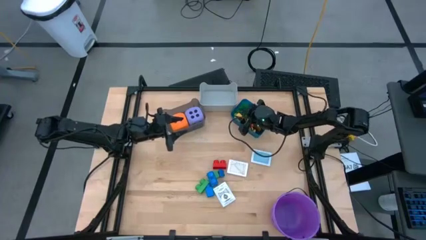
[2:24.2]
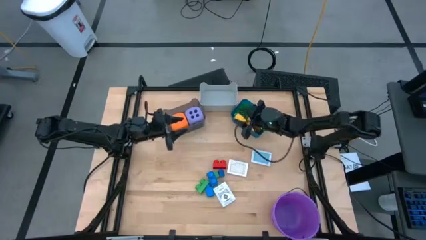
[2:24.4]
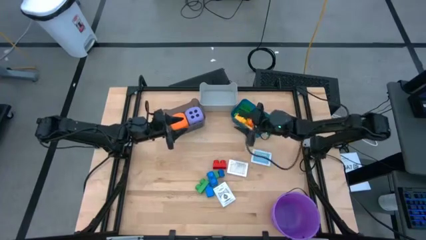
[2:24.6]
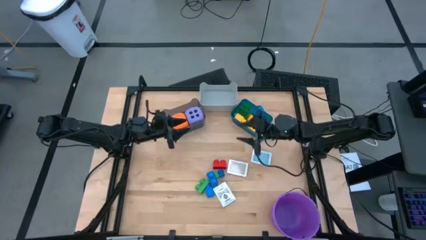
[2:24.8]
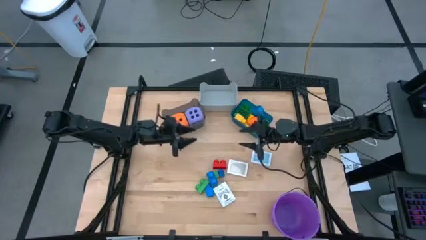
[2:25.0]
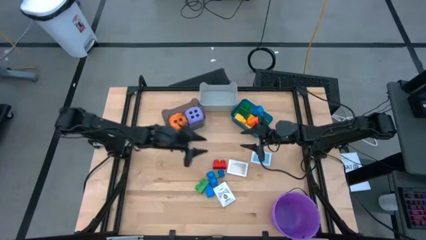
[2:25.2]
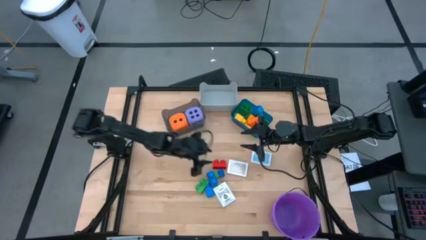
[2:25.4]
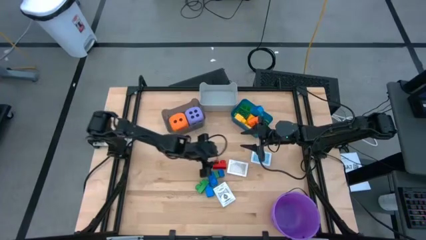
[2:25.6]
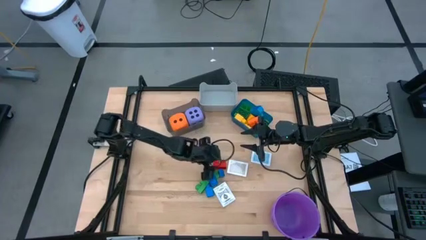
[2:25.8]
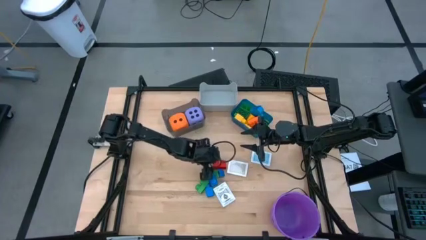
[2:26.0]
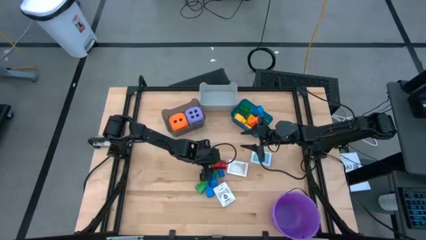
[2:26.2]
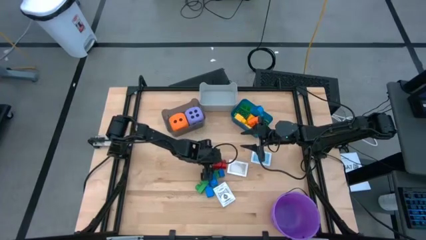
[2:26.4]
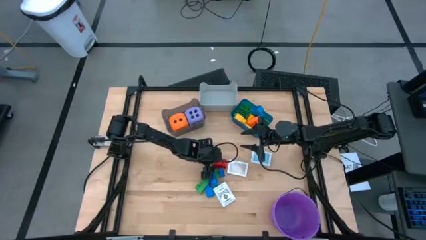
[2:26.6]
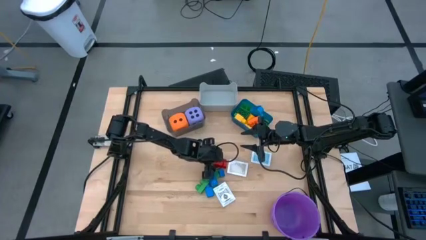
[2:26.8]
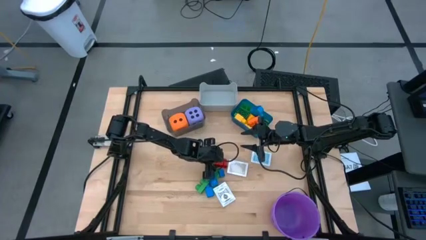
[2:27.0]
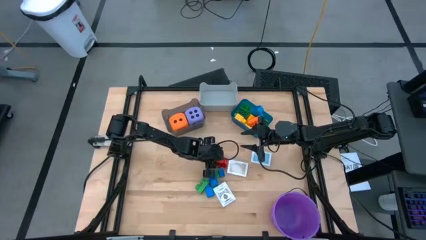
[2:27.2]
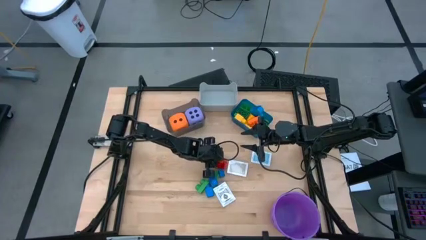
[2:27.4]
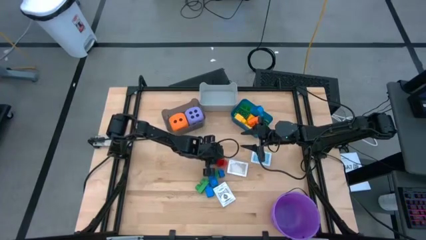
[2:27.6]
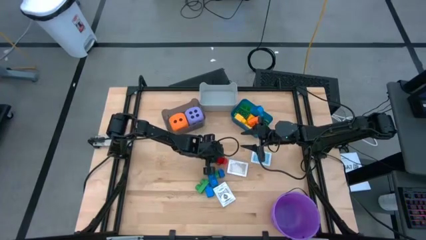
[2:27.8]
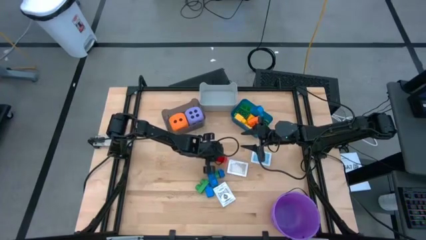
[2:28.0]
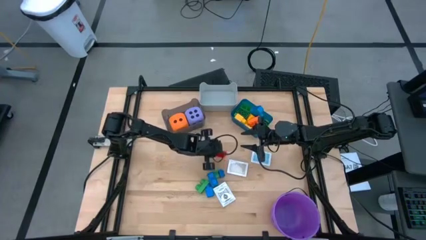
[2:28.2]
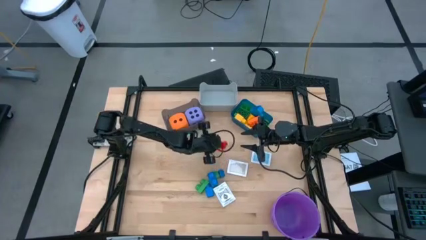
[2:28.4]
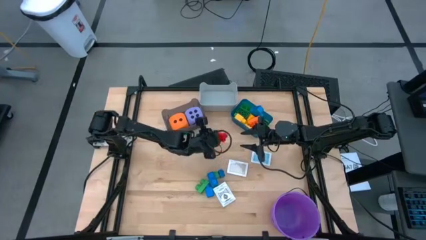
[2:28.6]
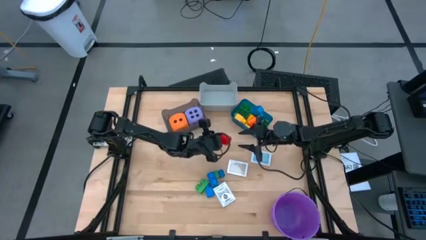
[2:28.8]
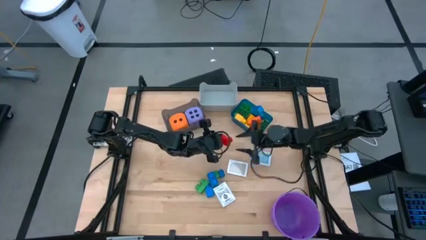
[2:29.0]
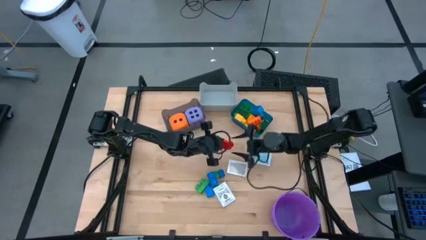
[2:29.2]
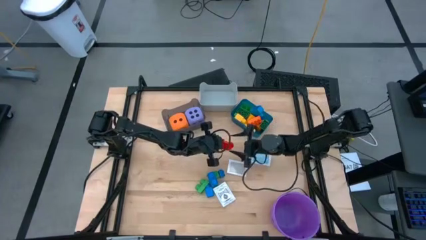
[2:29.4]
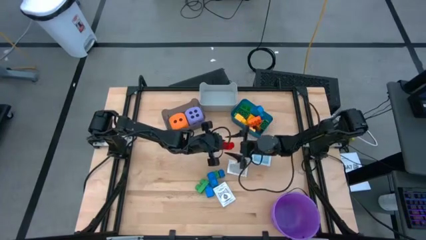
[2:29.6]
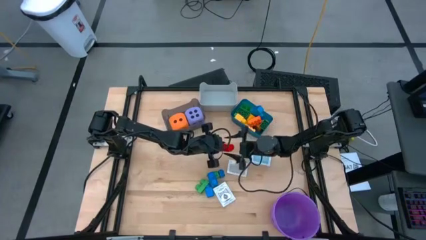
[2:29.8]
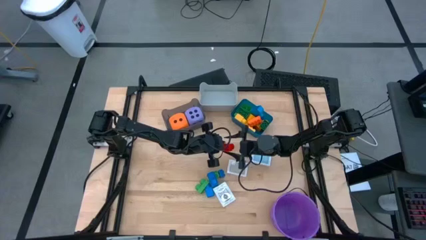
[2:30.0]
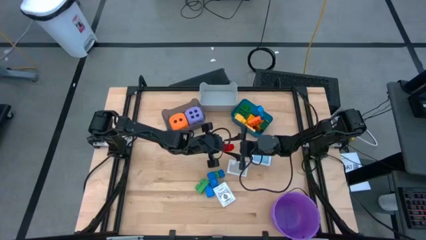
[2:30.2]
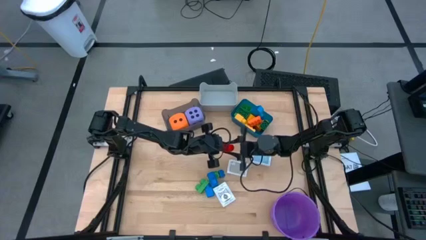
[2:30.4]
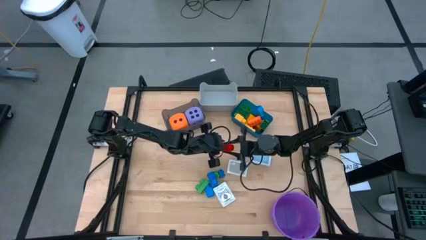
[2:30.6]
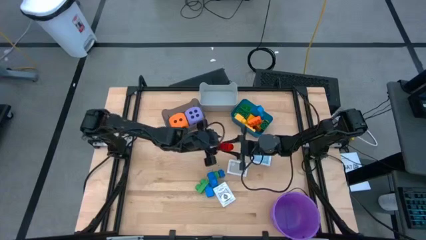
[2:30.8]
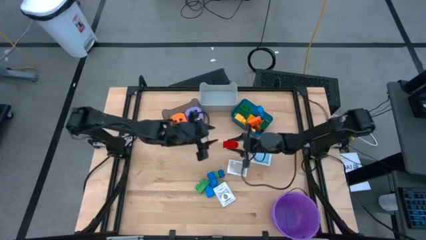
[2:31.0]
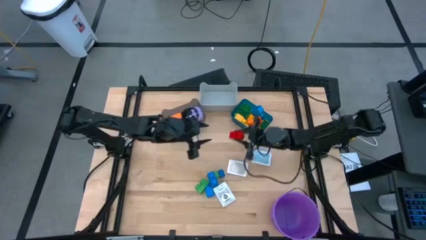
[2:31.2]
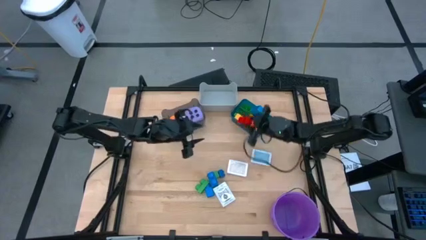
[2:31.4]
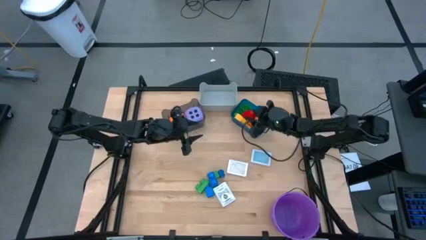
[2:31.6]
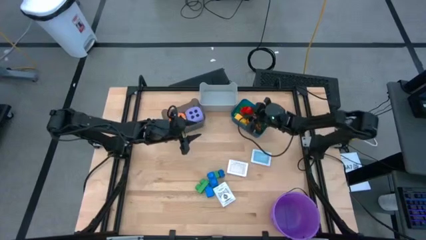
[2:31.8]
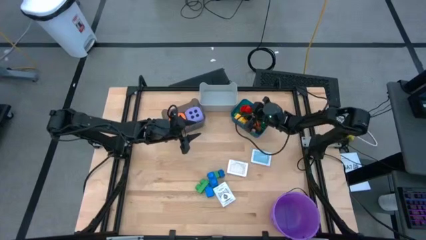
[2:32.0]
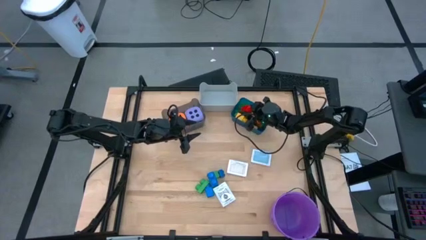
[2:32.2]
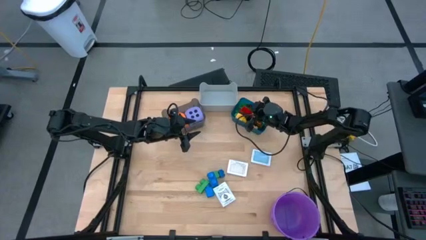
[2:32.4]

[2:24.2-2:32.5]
Task: Pick & Place Toys
Put the red 2 studs game piece into the blue bin

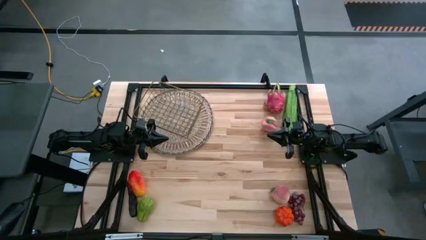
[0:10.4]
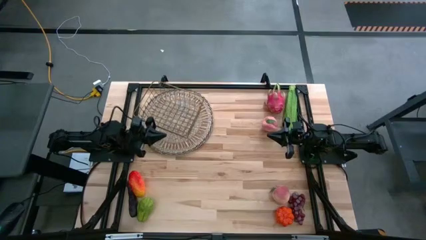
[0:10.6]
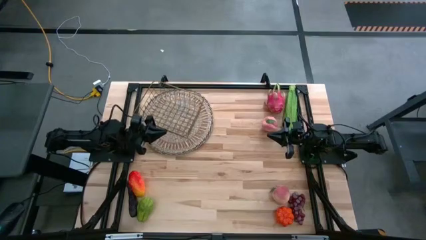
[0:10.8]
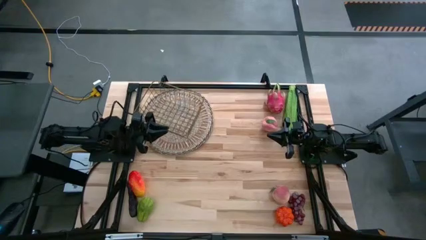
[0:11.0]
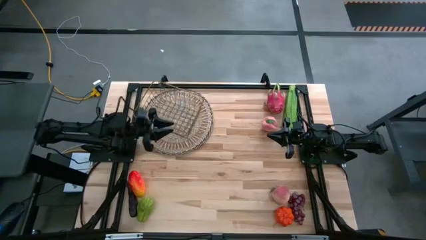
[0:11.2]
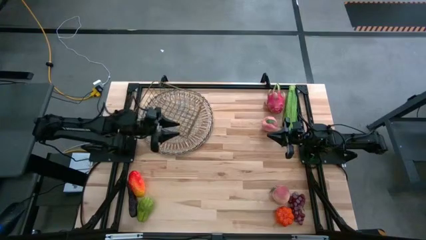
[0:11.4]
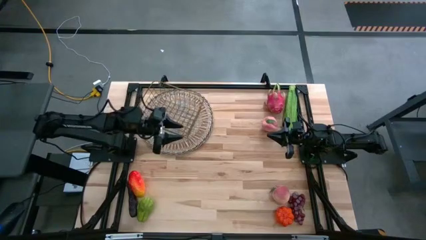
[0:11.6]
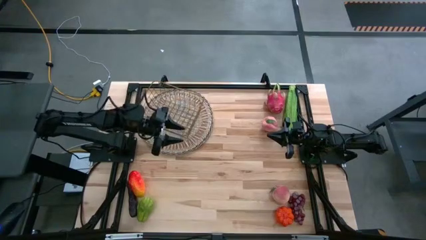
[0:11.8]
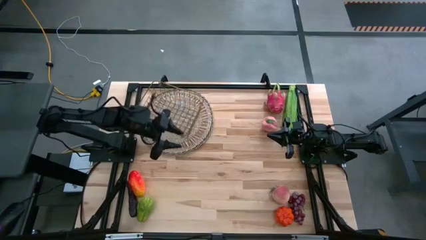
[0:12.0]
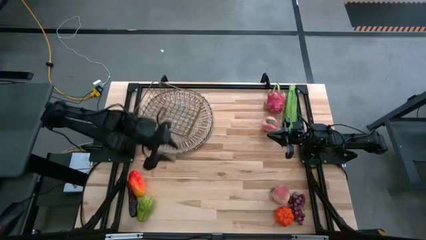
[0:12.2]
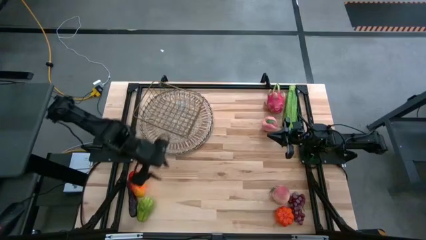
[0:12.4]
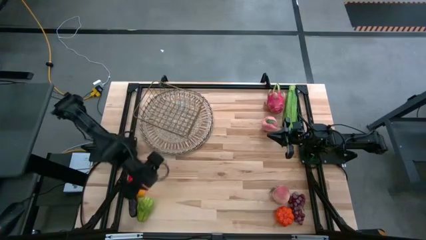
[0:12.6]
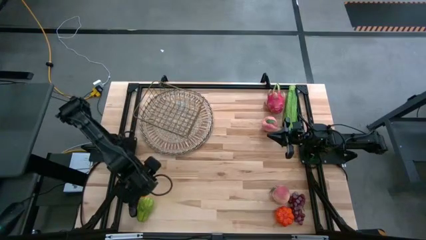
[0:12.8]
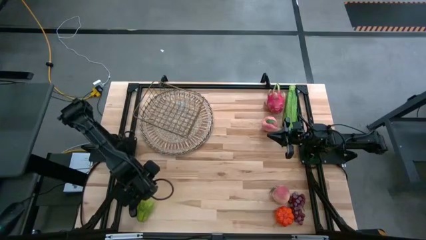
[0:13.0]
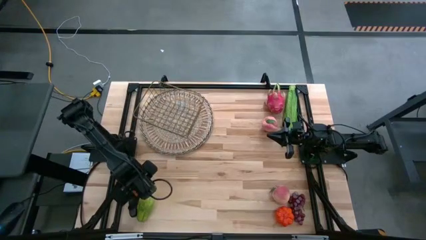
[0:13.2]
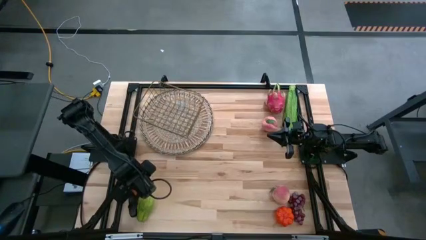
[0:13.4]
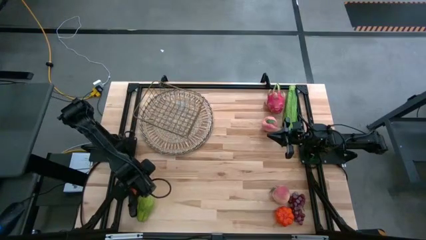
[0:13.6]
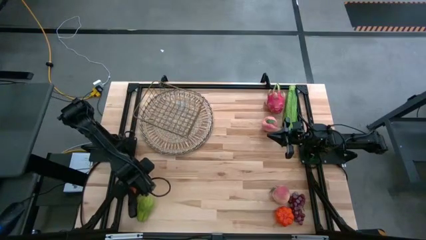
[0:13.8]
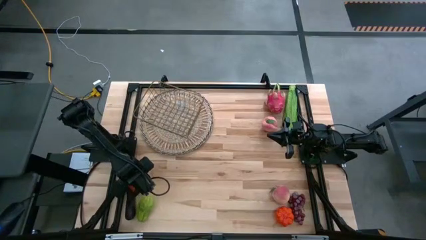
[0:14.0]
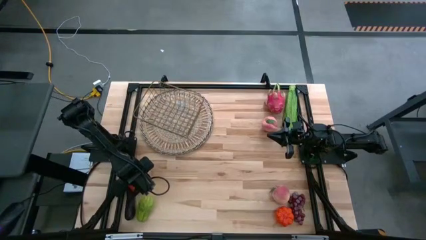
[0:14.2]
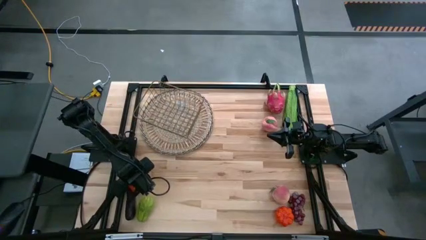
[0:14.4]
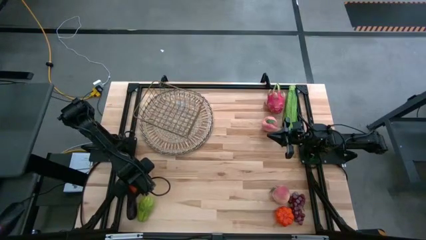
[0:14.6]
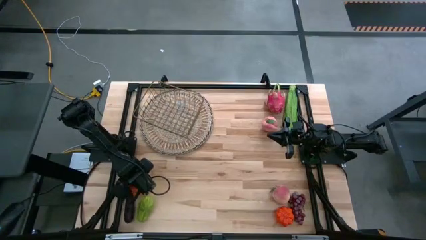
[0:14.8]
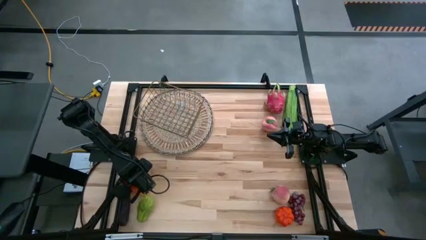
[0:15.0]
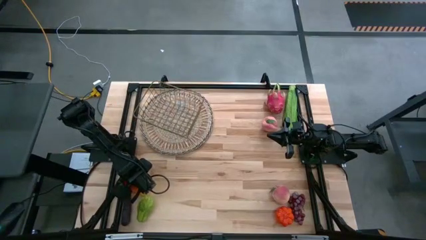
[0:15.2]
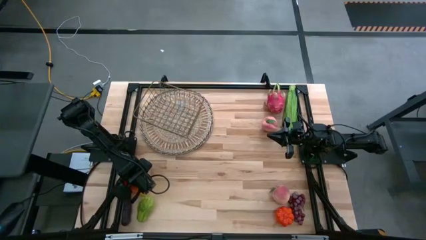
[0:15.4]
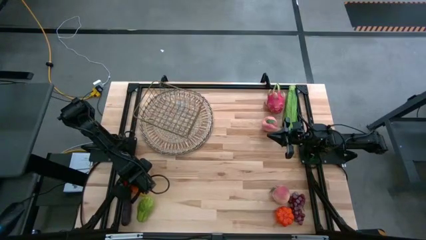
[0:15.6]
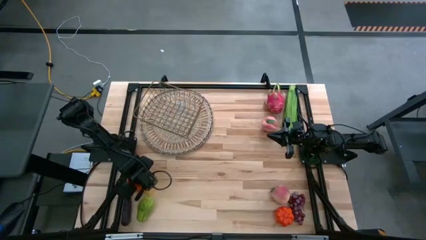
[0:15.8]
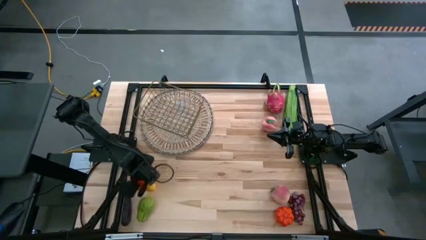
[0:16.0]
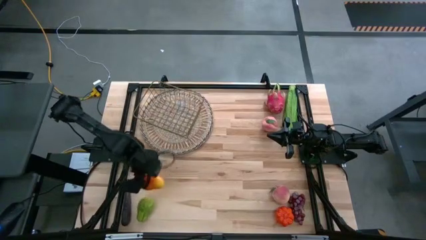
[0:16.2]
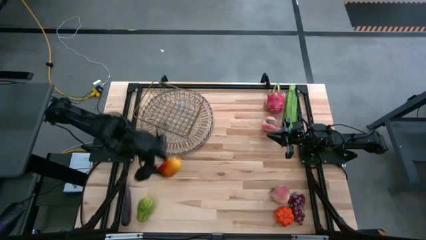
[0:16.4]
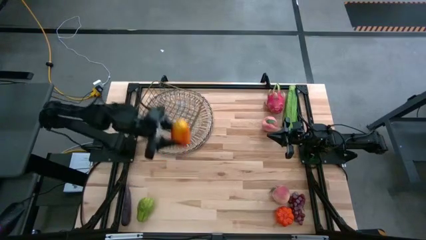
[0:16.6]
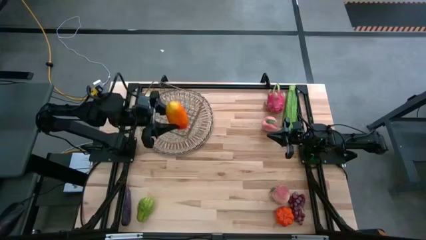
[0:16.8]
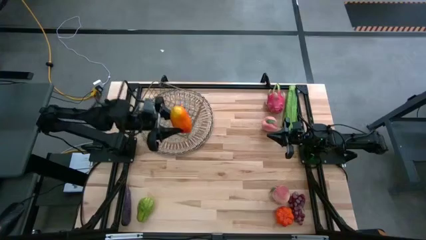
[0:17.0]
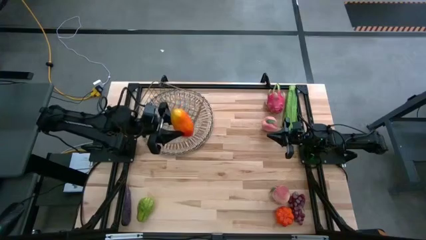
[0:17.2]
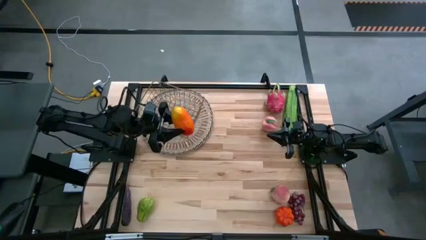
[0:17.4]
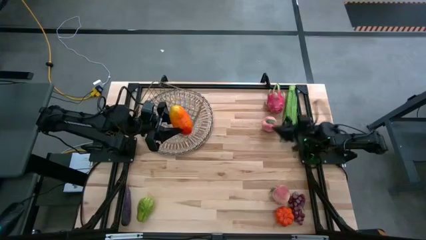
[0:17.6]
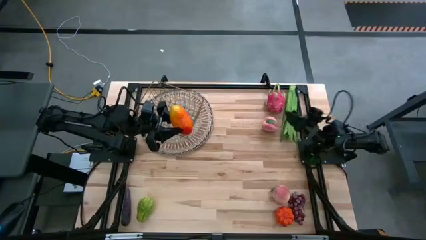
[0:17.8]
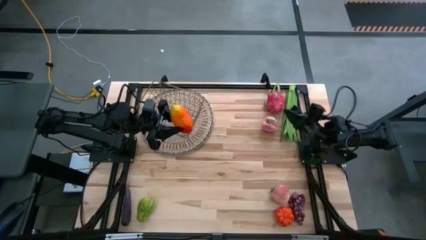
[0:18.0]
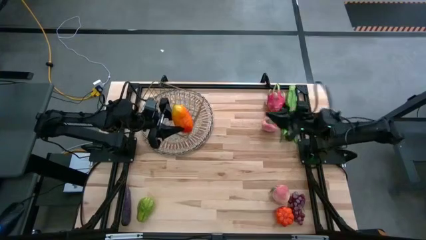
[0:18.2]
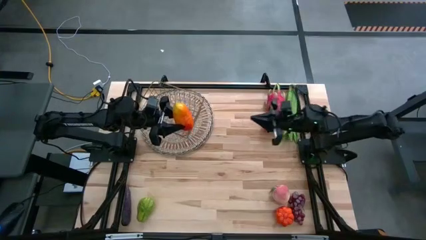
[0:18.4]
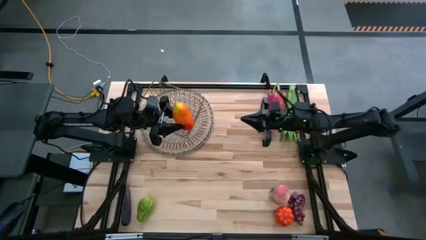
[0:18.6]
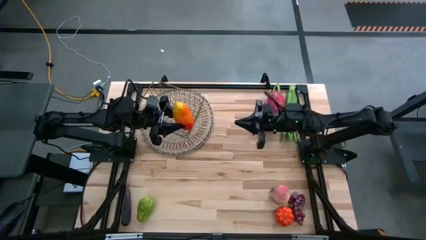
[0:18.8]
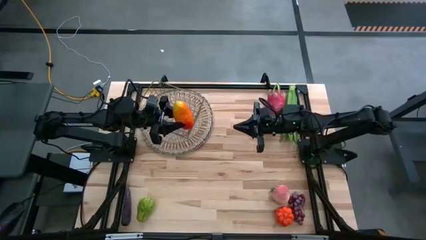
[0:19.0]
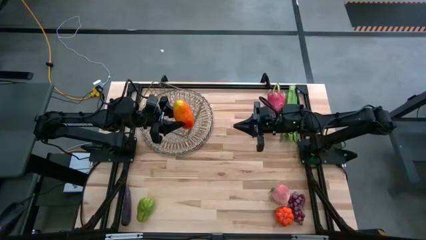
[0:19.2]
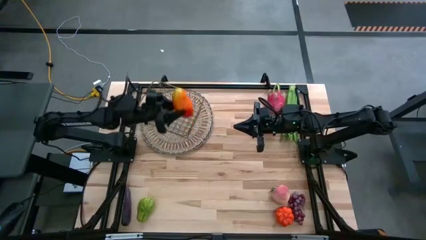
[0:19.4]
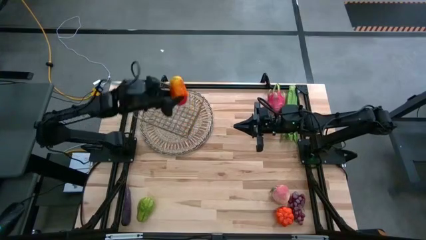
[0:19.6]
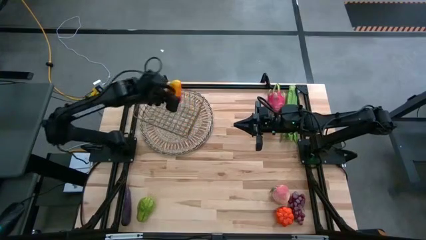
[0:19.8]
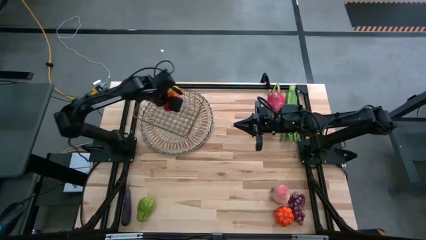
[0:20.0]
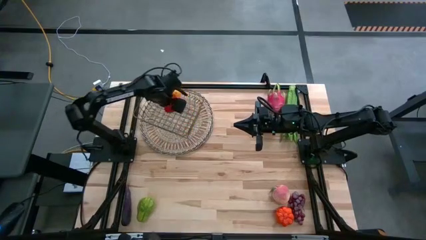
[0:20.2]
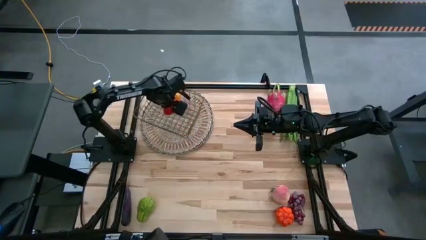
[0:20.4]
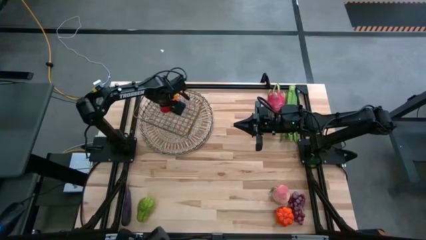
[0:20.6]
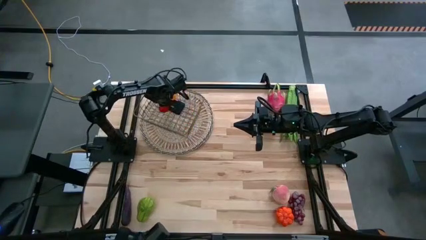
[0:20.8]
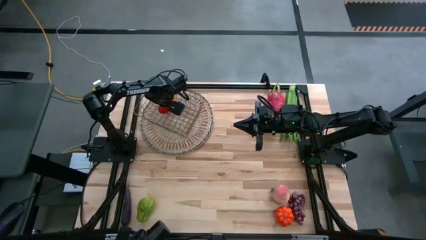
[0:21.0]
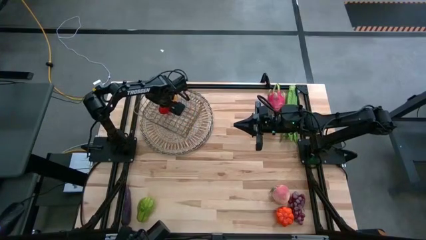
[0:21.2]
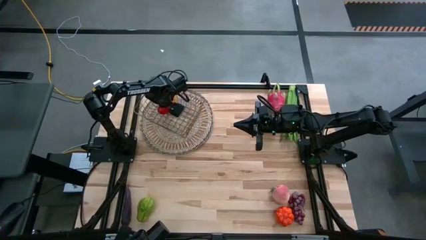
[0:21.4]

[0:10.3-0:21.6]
Task: Build produce basket
Put the mango into the wire basket
